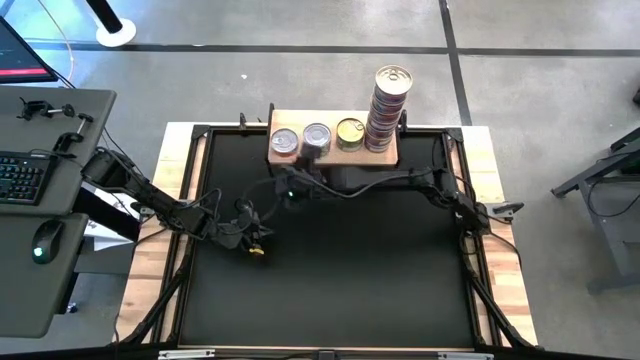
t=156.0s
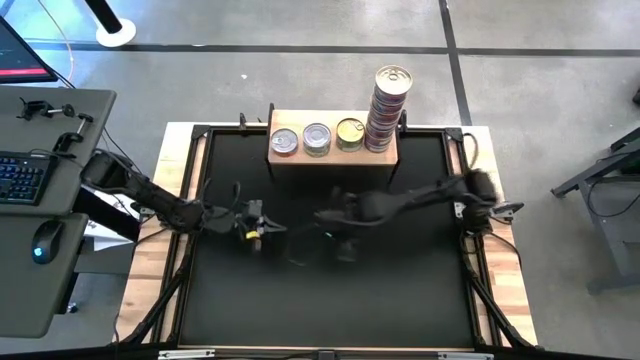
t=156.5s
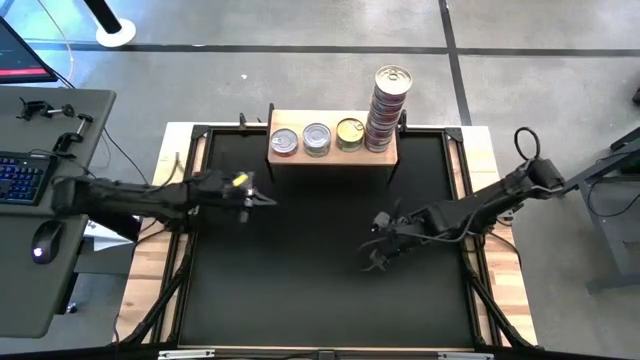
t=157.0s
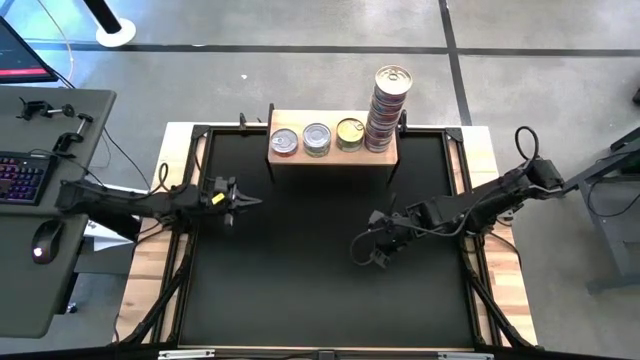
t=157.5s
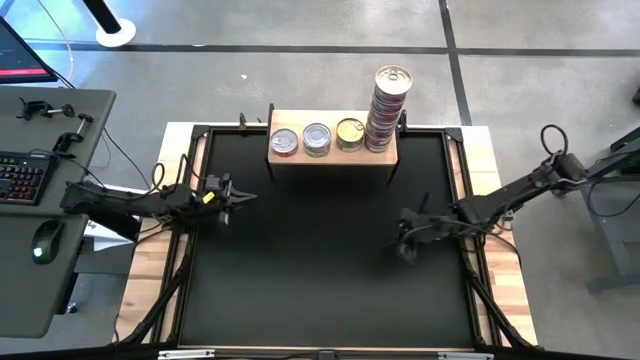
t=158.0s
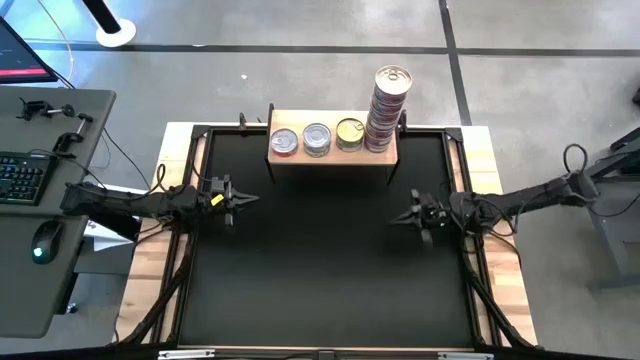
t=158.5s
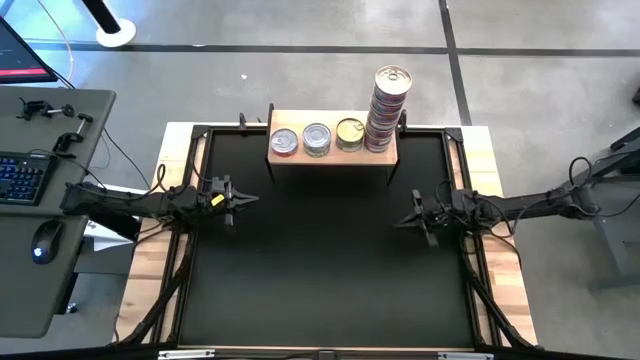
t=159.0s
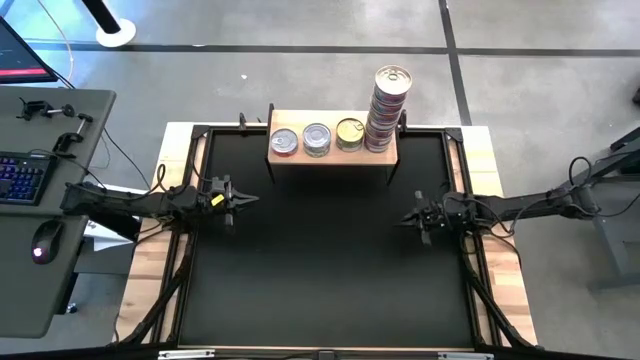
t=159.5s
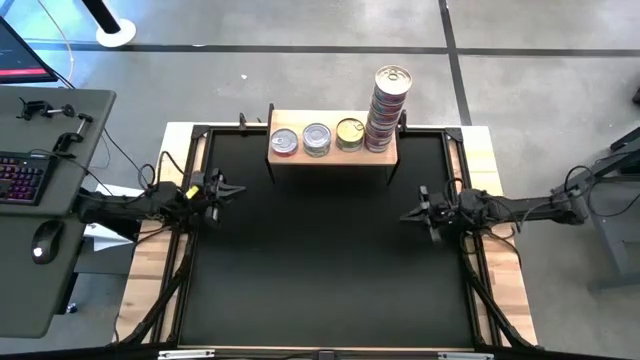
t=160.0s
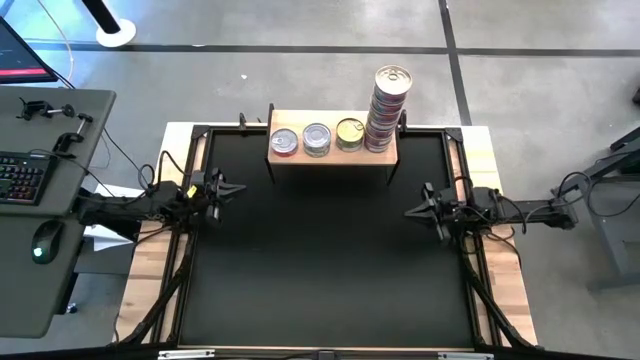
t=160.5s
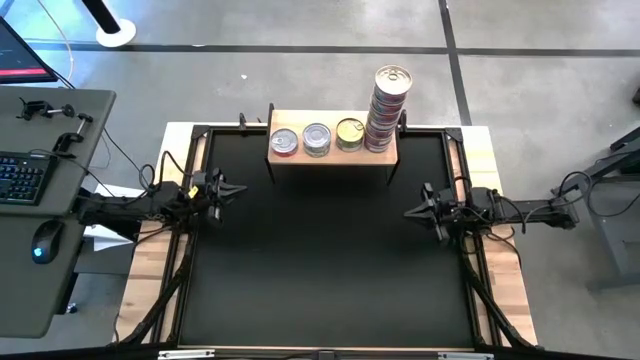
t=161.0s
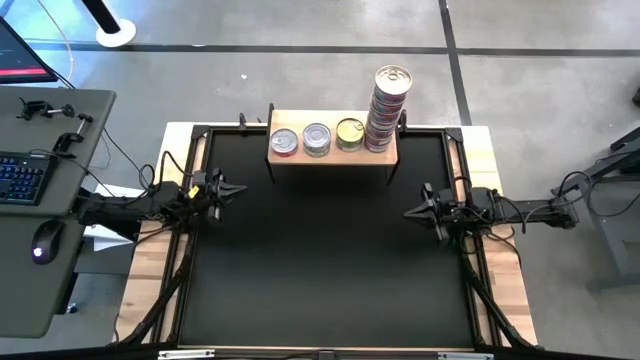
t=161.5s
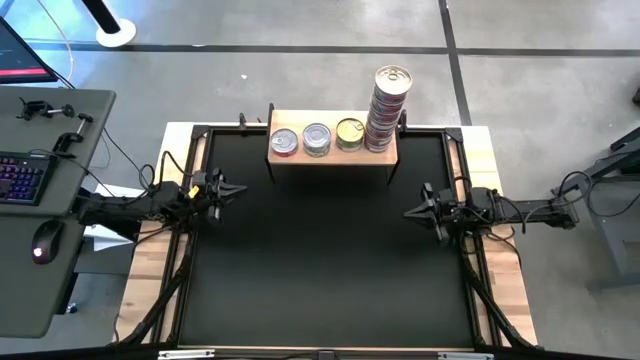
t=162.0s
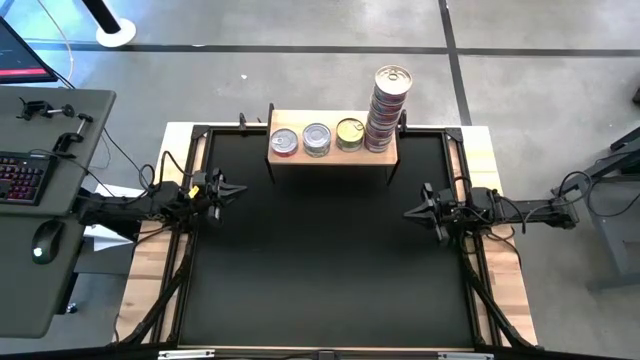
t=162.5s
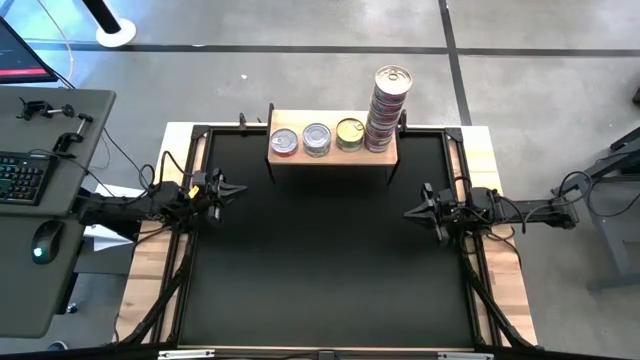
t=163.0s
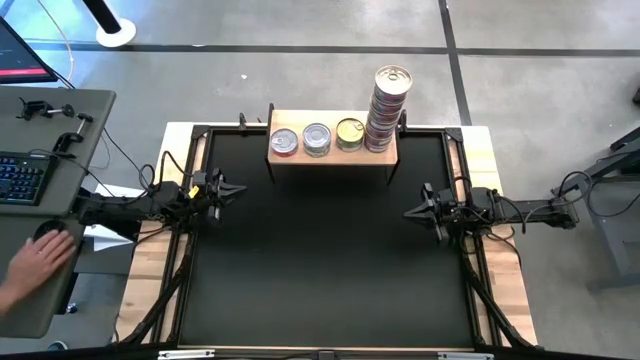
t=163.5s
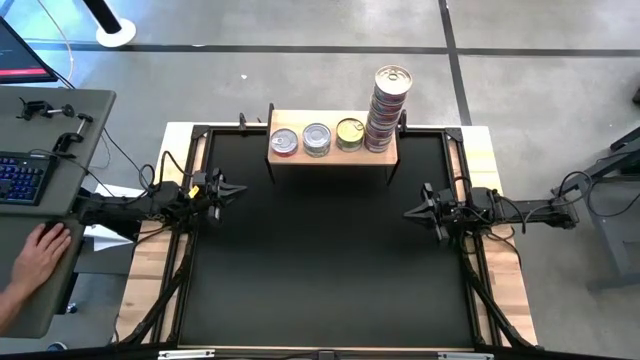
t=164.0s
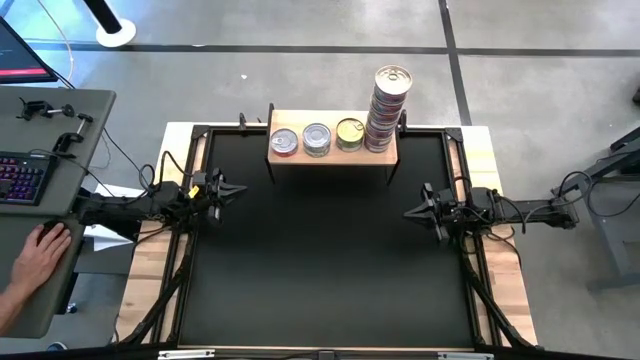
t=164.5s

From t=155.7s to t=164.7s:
Task: Stack canned seafood by type on shelf
Return to Home Position

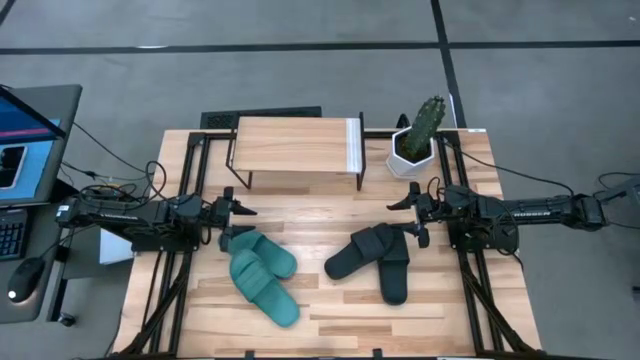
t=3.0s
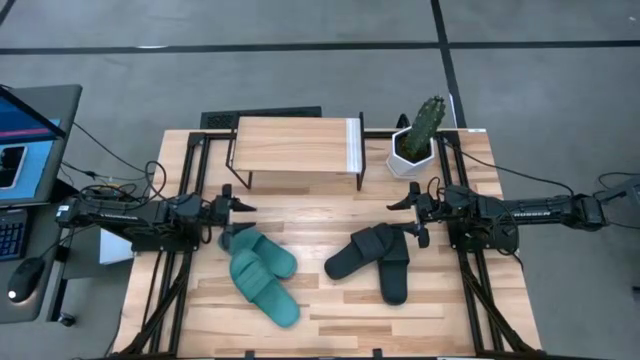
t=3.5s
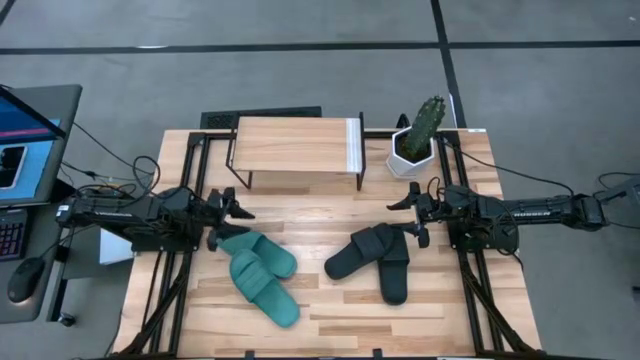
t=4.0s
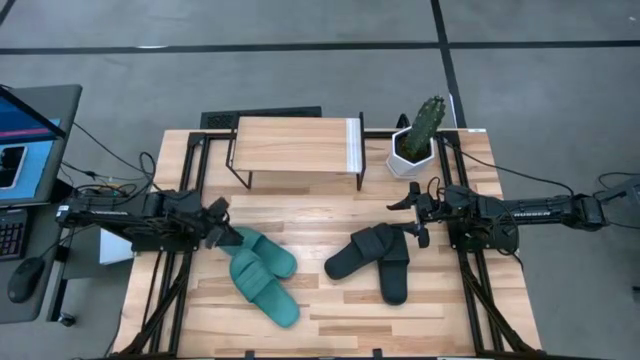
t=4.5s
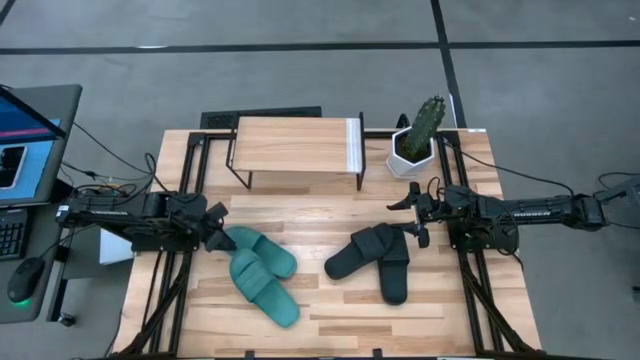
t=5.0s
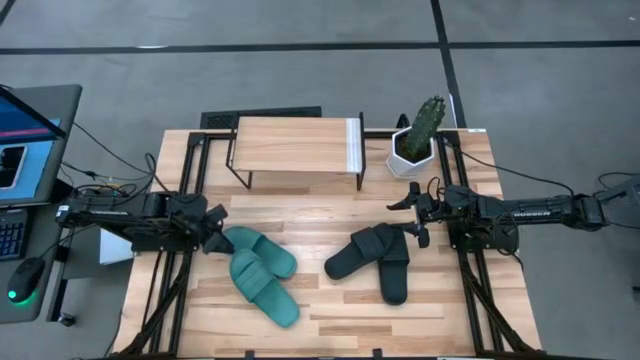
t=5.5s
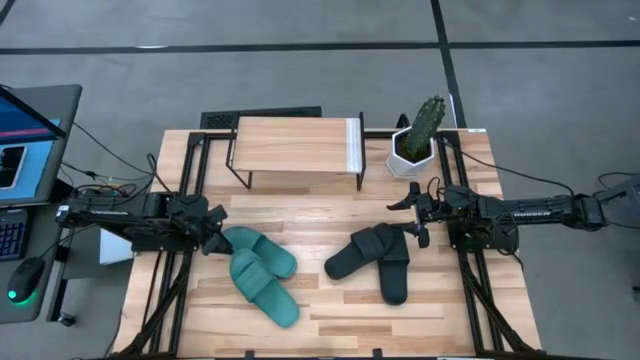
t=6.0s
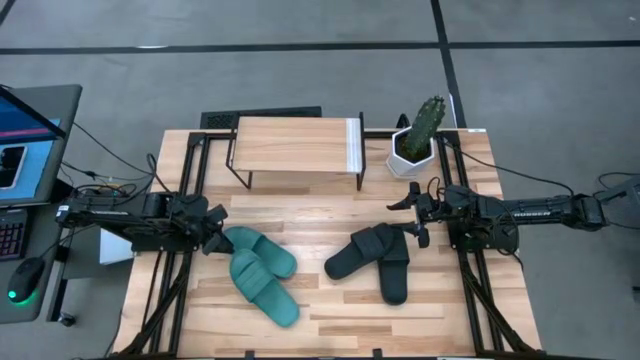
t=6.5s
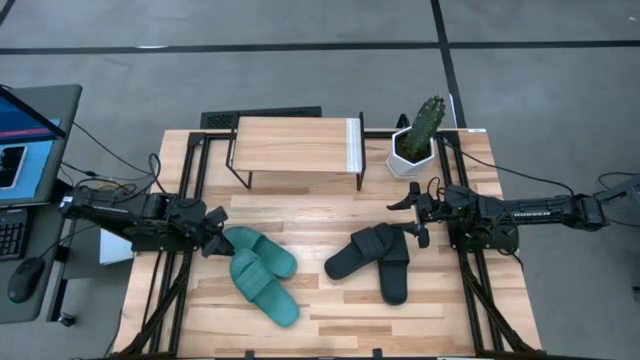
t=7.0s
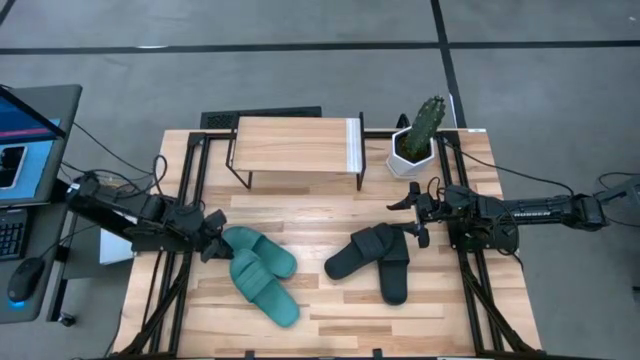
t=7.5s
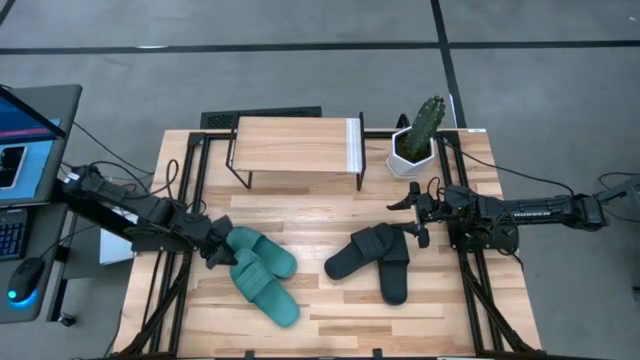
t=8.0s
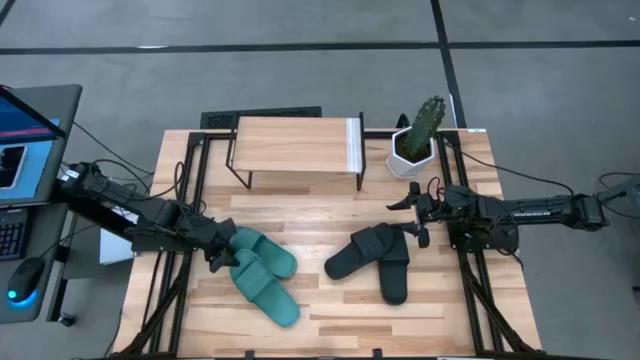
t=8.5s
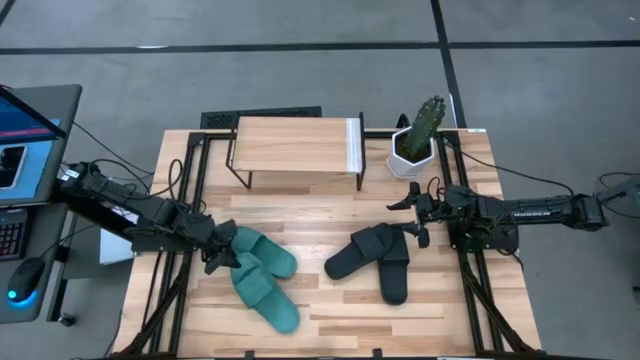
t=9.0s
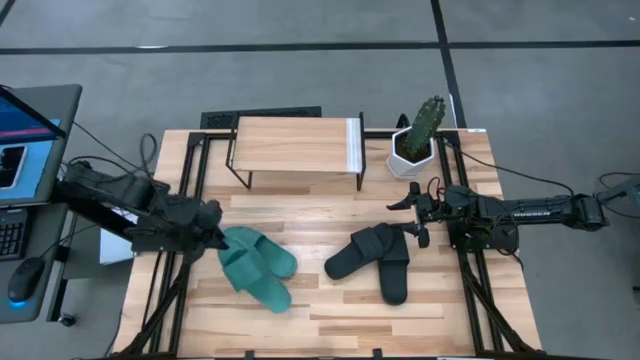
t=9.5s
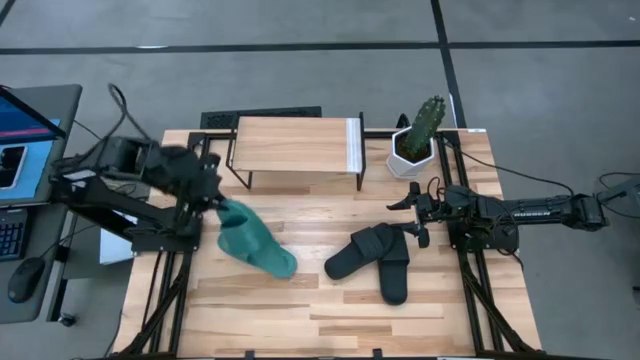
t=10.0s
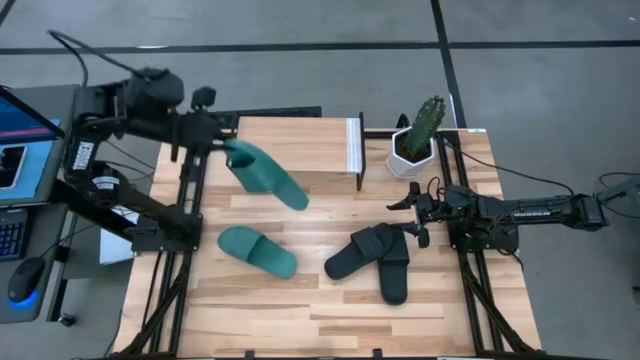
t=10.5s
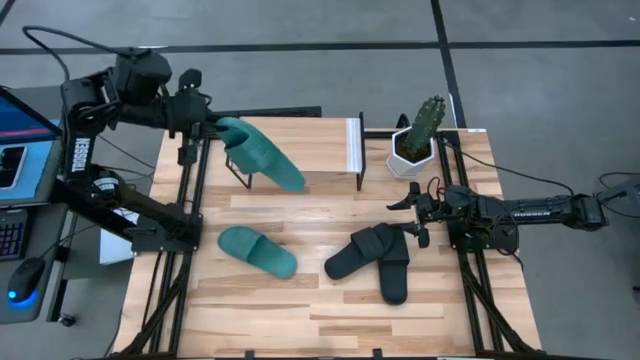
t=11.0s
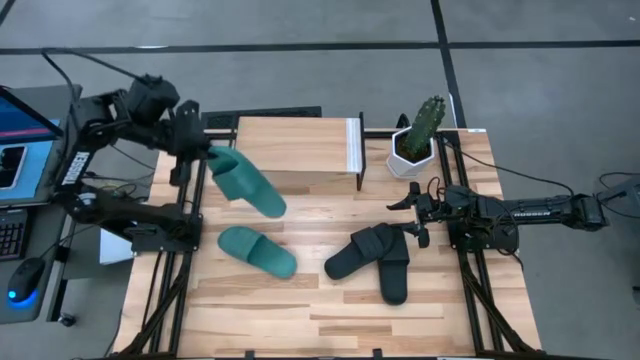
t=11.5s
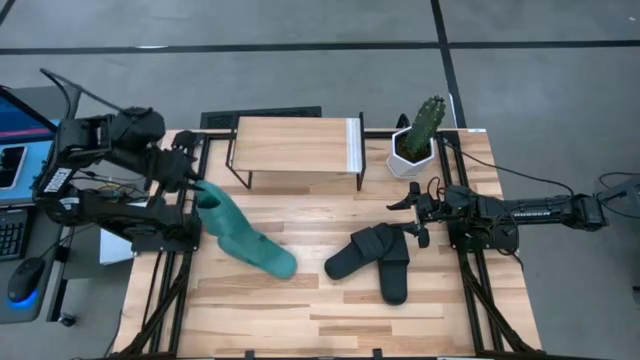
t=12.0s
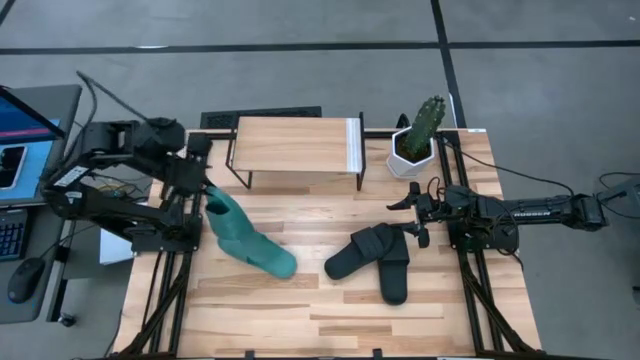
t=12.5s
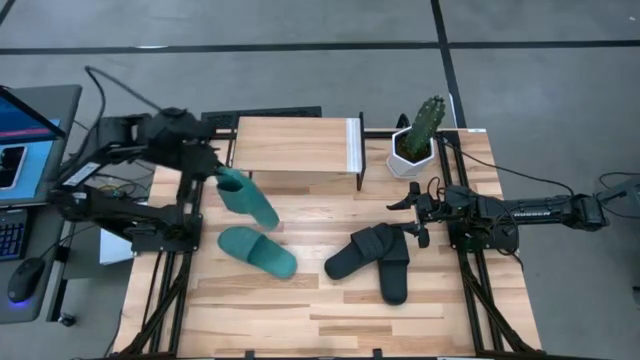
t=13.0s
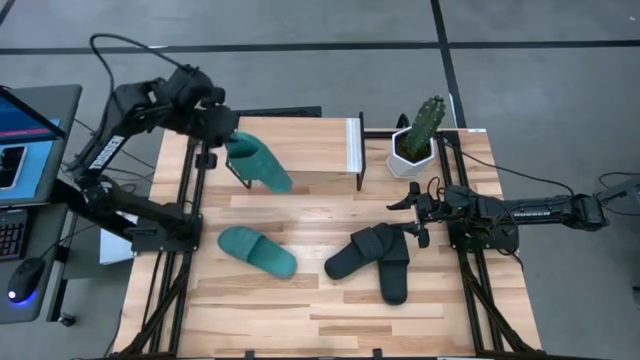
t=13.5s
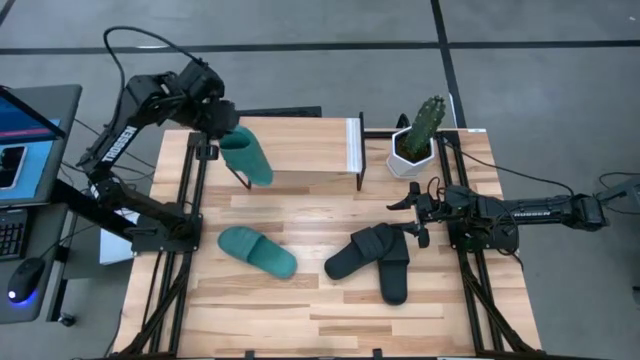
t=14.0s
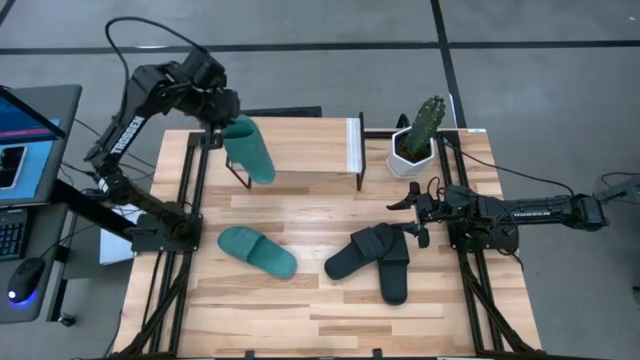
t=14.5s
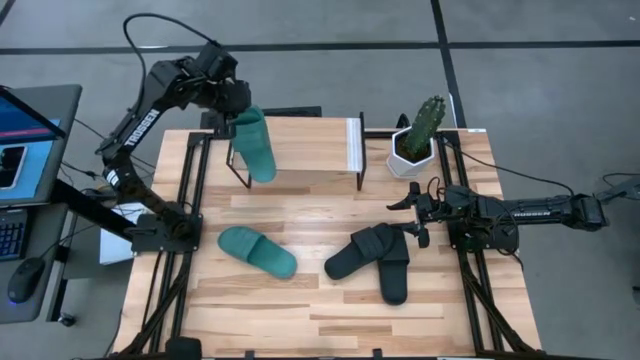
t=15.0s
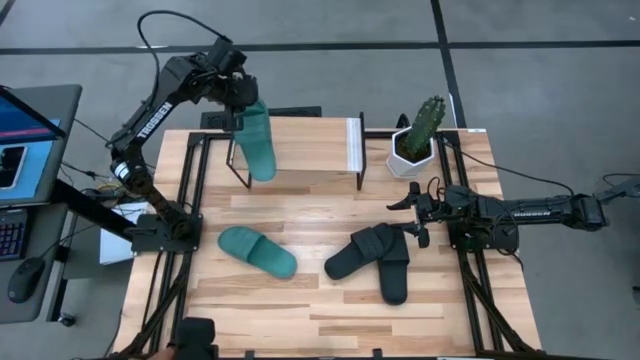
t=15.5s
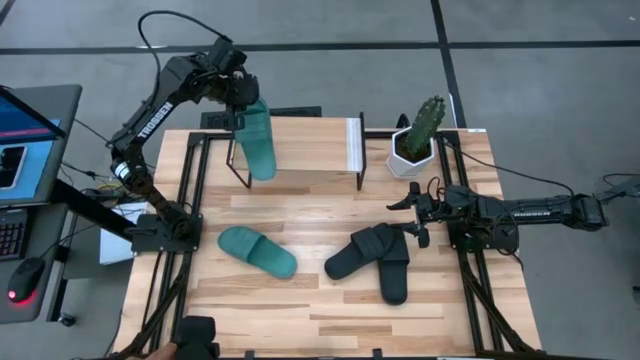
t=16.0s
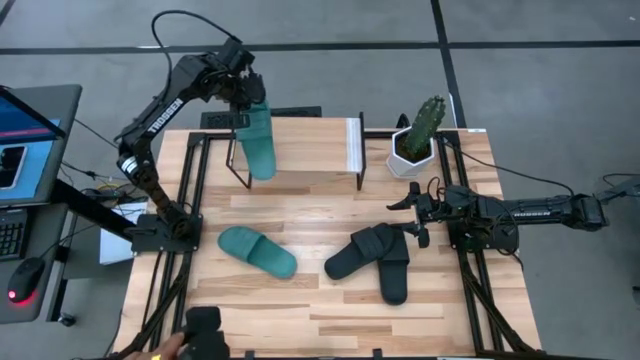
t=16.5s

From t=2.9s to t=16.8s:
Task: Pick and place slides into the shelf
Put the left light blue slide on the shelf
